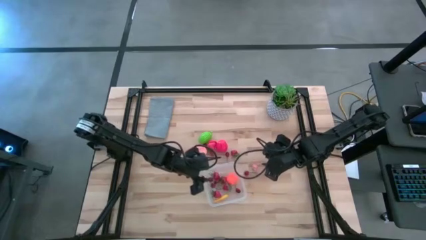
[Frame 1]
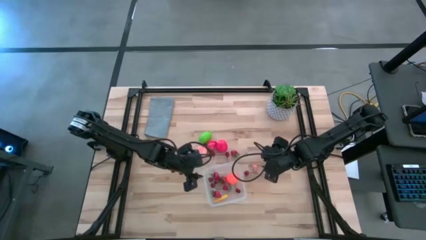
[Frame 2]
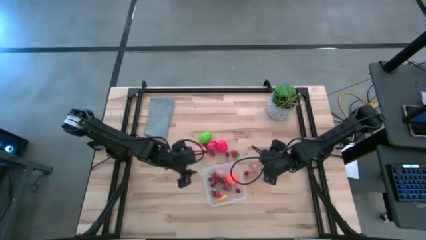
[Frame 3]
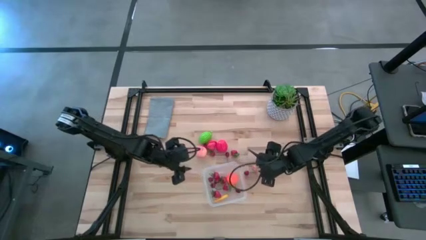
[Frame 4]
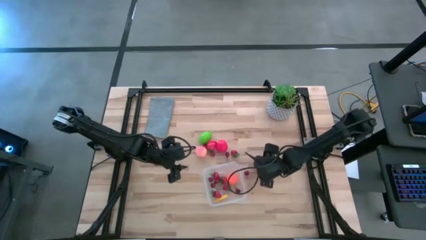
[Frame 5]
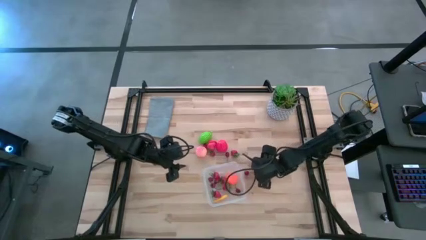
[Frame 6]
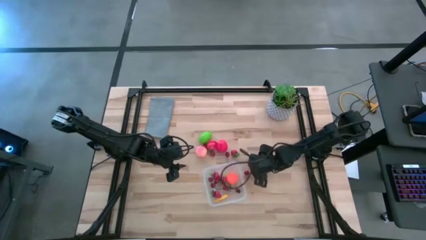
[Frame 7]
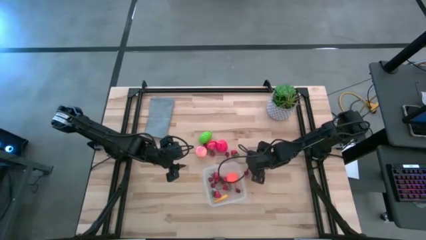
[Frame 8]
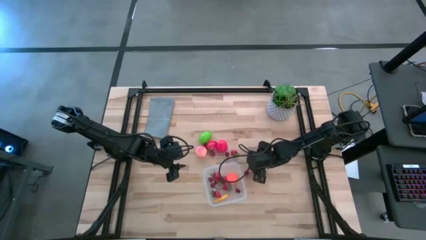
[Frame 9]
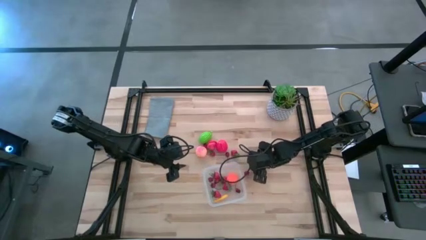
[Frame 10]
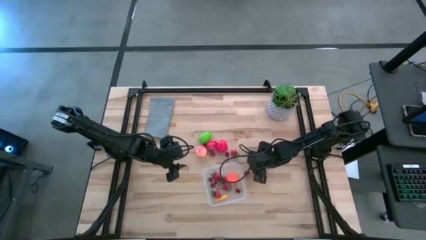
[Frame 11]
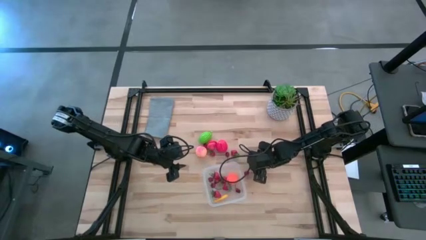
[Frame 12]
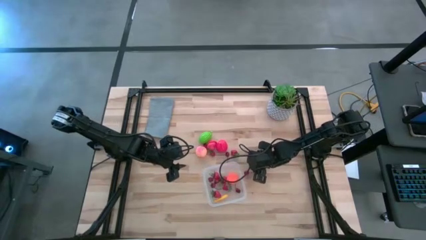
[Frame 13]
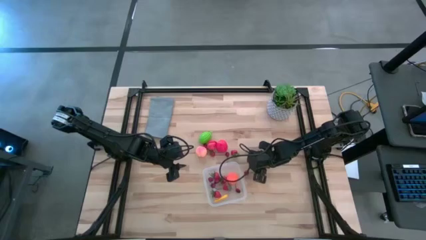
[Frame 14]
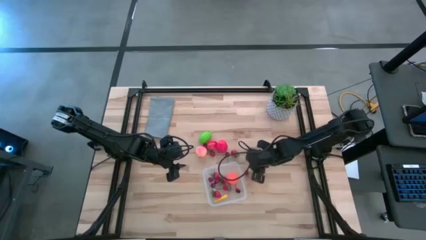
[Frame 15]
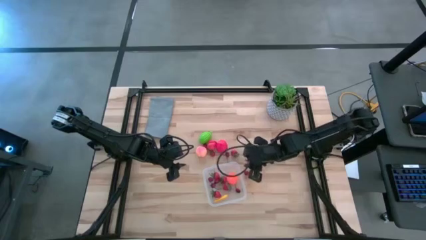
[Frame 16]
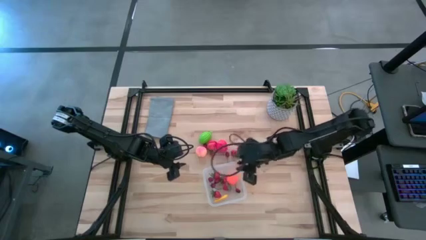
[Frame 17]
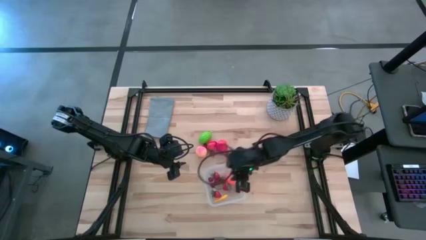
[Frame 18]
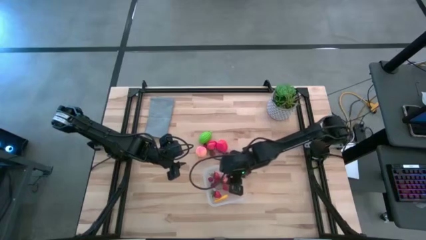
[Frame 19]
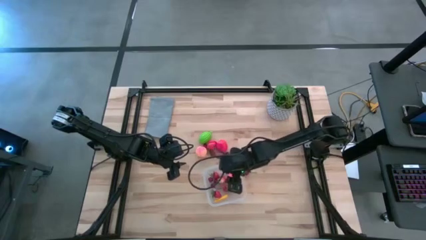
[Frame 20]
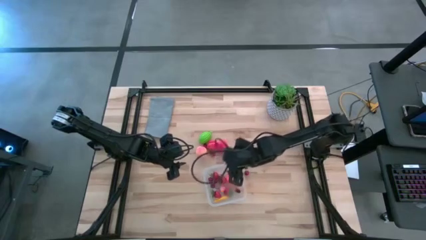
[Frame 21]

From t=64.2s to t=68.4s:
Task: Pick and placing Produce into tupperware
Put the bottom pink peach into the transparent bin

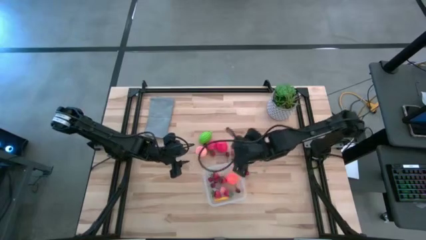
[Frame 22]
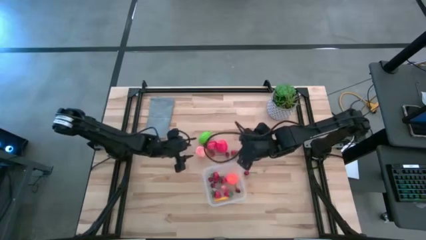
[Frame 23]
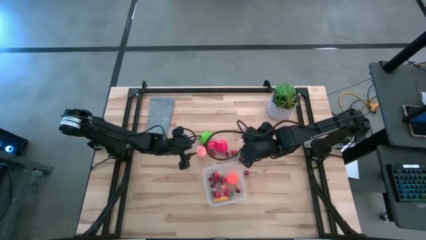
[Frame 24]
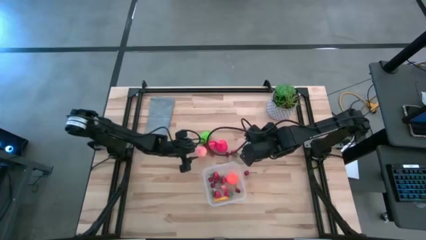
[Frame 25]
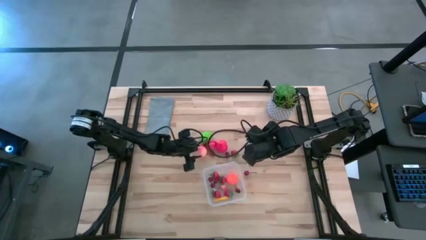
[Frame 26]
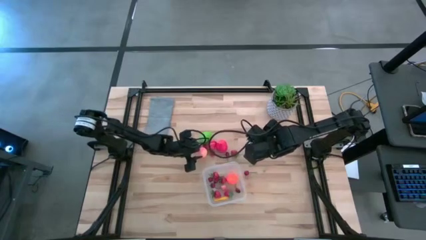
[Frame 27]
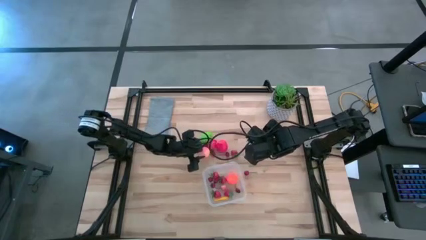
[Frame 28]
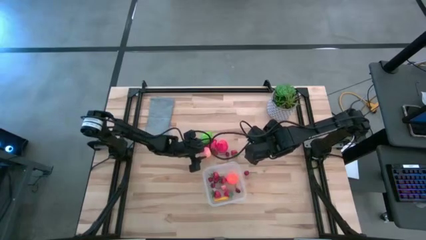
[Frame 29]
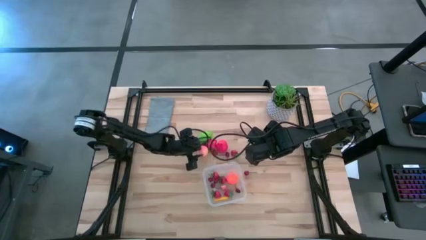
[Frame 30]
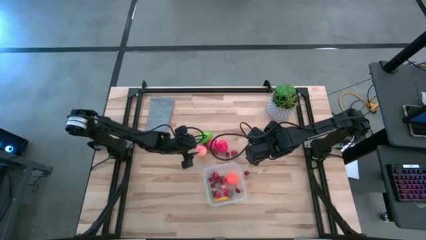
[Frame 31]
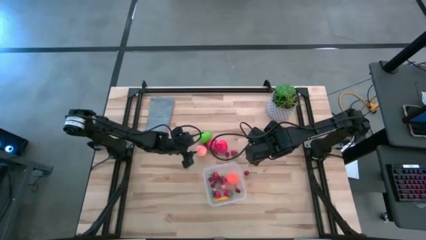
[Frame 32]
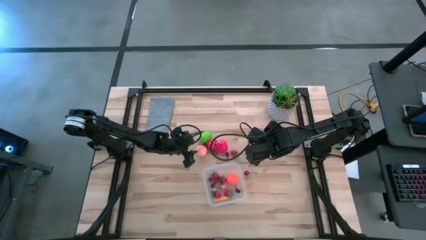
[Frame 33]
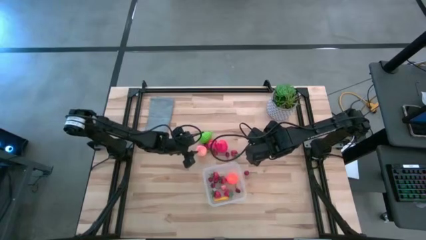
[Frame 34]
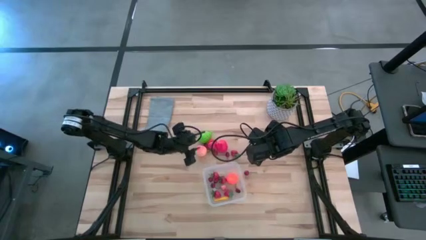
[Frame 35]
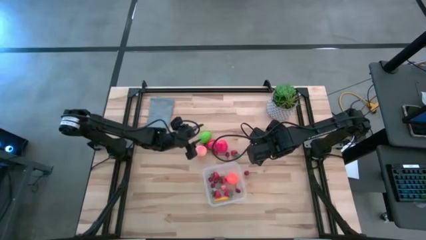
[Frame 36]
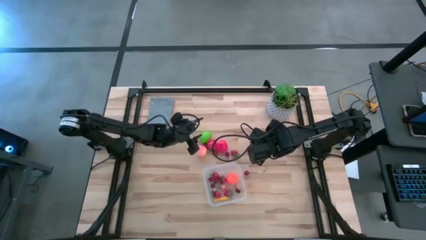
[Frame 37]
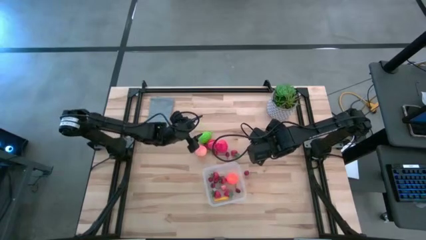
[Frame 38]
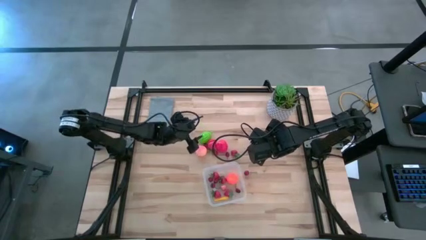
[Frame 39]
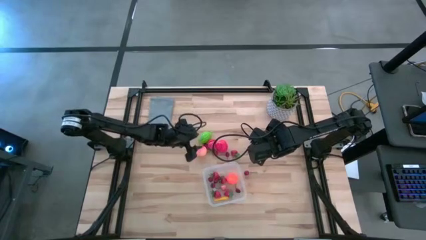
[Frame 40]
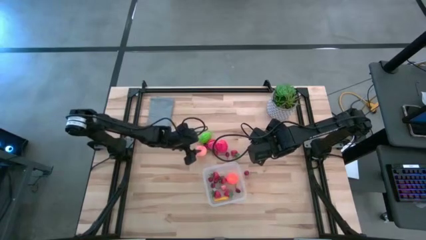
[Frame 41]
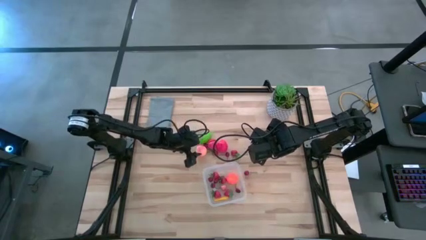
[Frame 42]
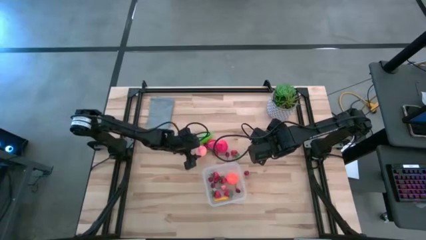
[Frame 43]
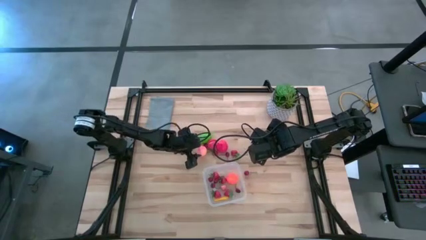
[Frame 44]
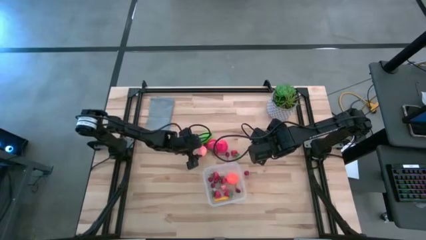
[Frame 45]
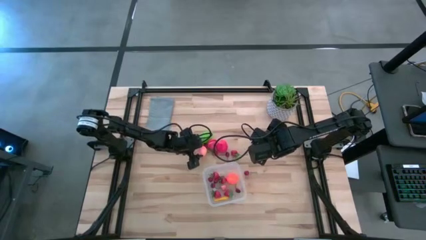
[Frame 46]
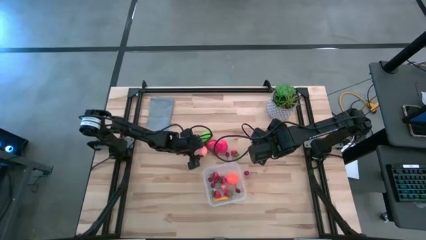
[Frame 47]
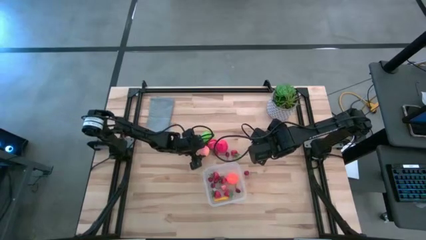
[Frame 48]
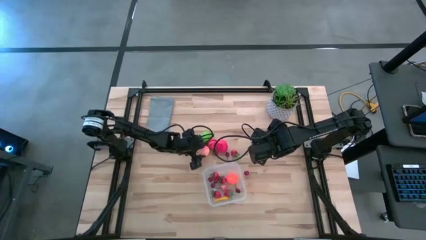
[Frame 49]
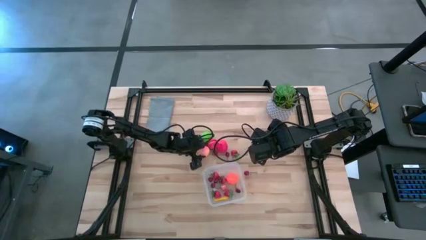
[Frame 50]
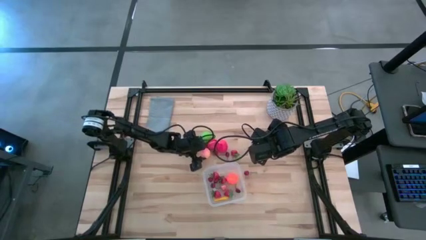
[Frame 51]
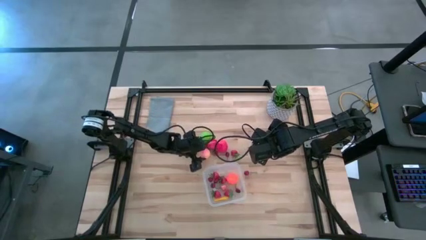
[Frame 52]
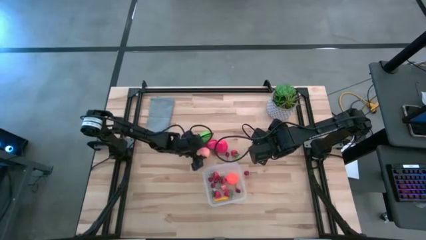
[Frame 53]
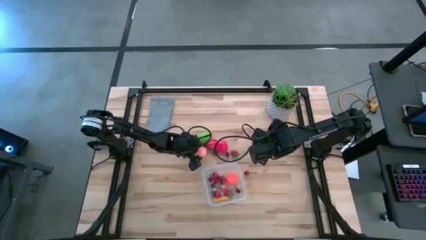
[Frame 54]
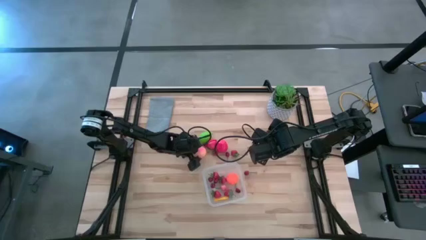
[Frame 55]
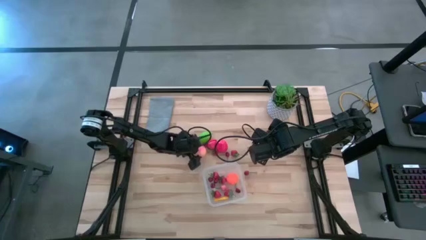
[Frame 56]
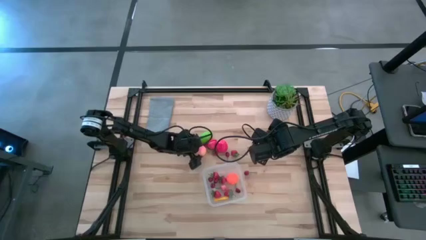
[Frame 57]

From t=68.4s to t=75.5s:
Put the pink peach into the transparent bin

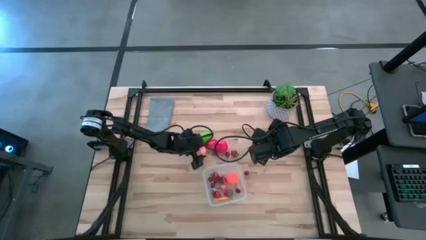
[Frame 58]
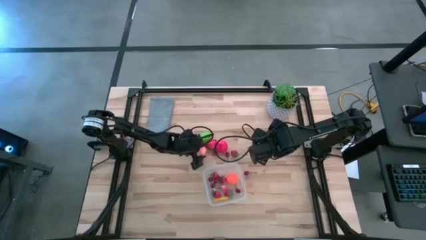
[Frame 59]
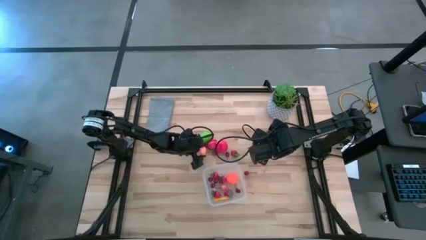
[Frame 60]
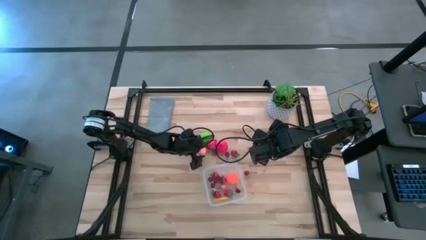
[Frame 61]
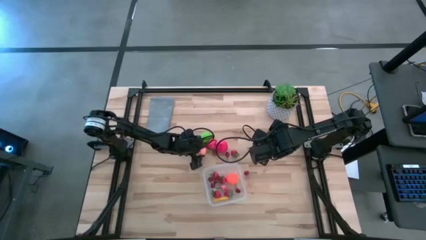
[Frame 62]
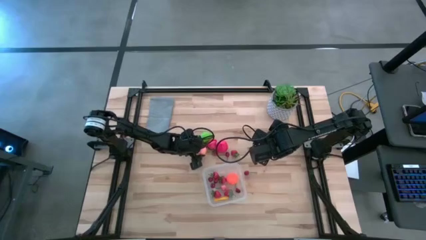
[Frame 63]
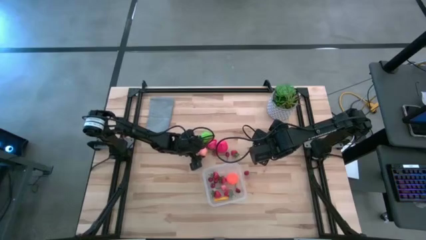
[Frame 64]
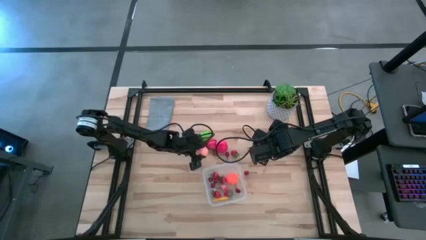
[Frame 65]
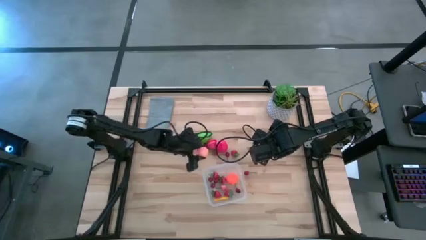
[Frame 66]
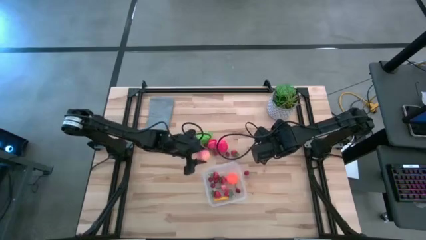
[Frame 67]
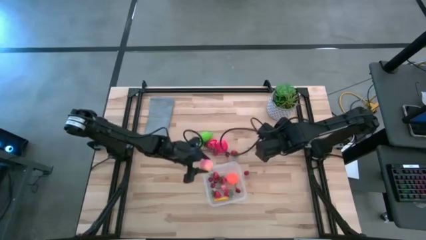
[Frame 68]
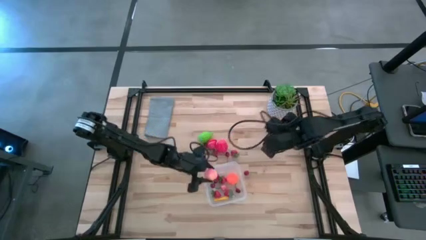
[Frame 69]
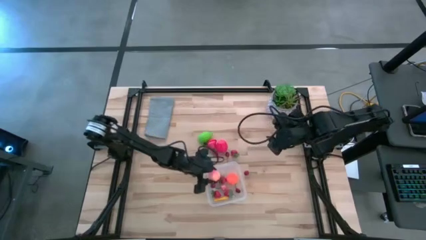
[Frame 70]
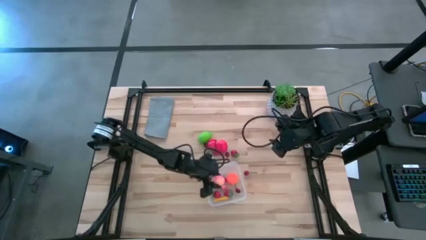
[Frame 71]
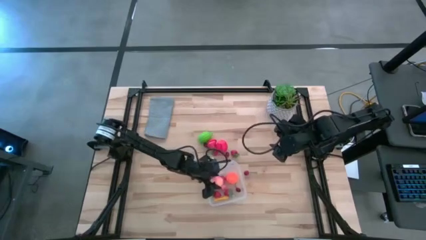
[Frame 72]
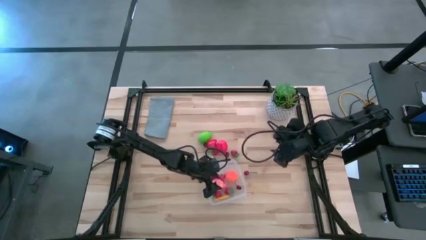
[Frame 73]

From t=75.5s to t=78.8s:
Put the pink peach into the transparent bin

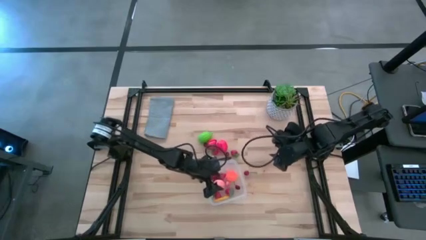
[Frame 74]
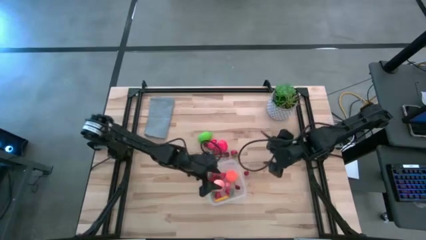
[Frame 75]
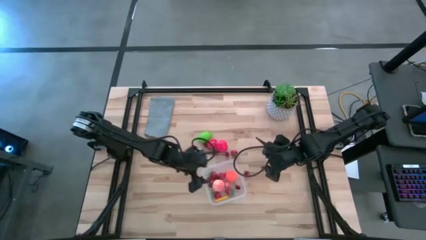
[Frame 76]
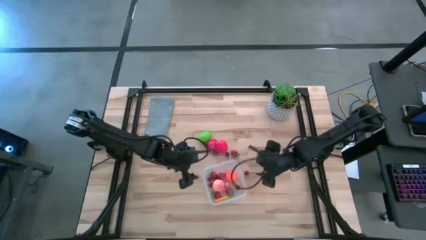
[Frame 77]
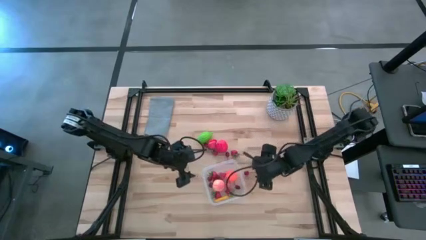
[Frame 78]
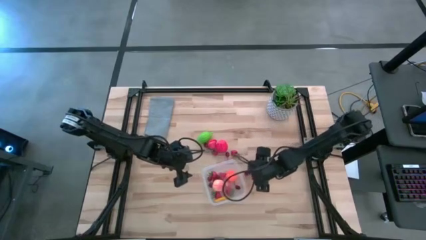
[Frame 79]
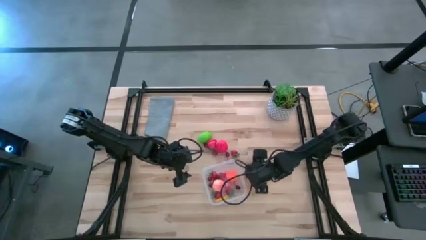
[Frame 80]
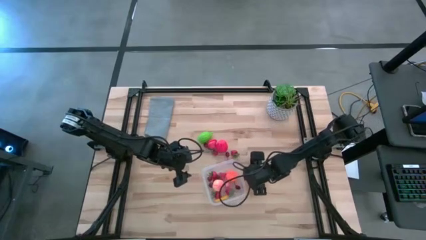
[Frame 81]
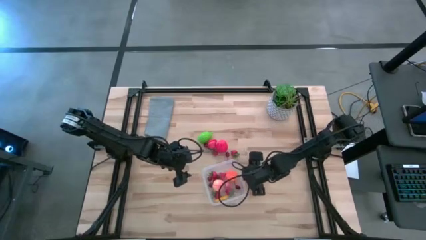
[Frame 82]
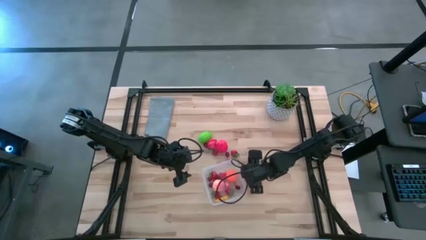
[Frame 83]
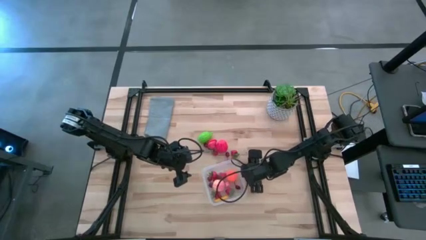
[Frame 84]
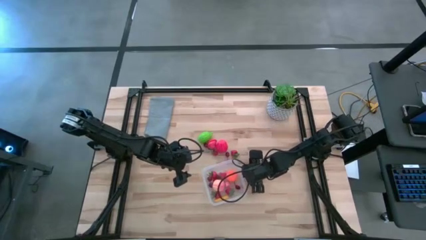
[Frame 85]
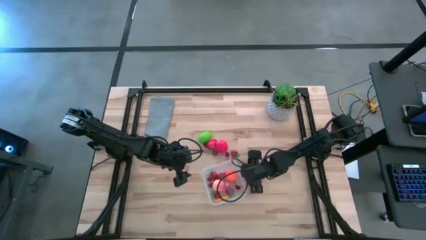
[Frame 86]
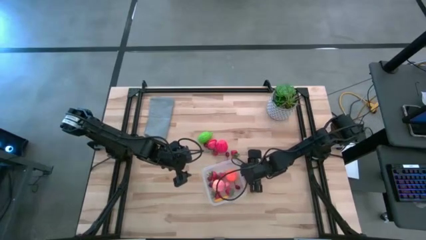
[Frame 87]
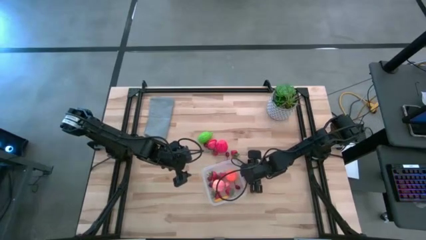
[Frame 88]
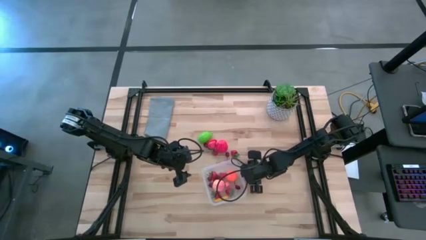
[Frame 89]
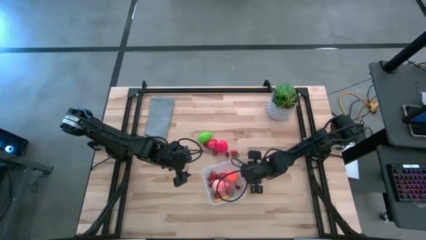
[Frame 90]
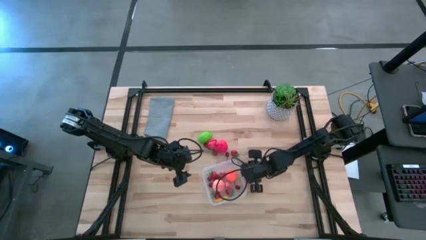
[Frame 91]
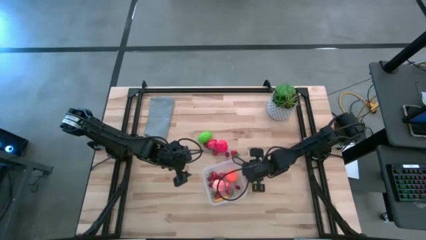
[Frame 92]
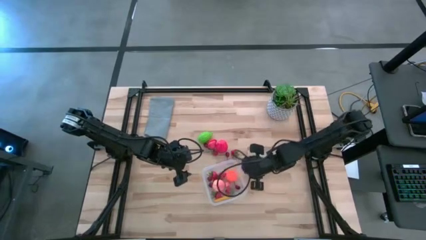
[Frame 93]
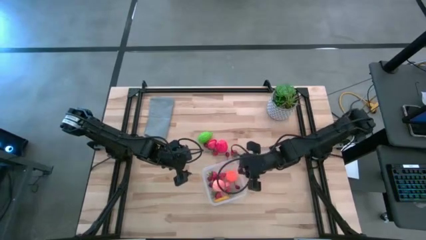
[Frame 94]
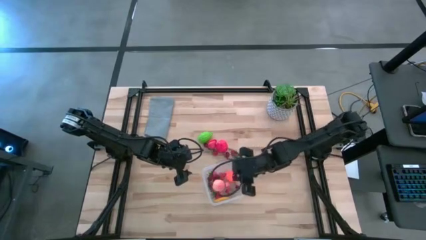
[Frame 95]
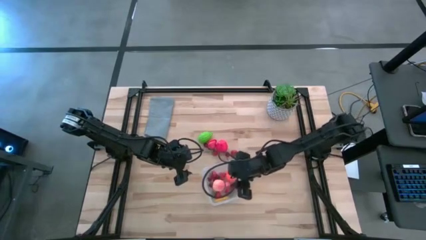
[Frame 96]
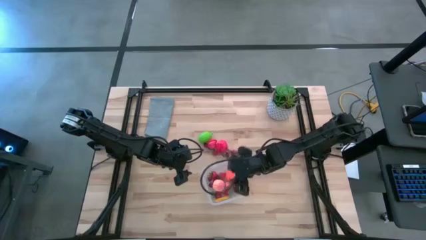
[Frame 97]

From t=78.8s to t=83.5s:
Put the red cherry into the transparent bin
